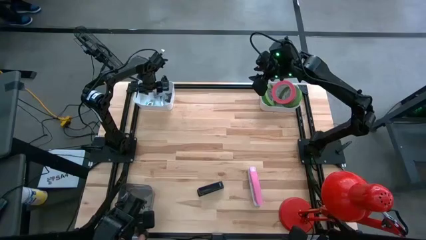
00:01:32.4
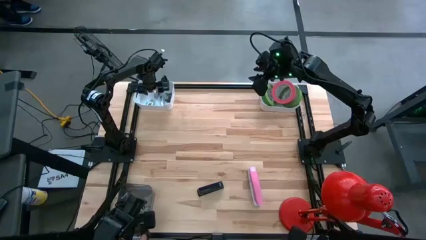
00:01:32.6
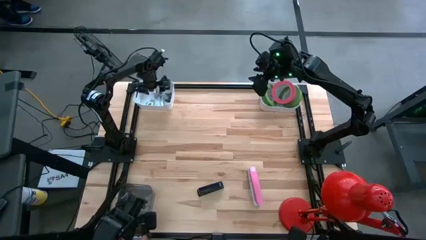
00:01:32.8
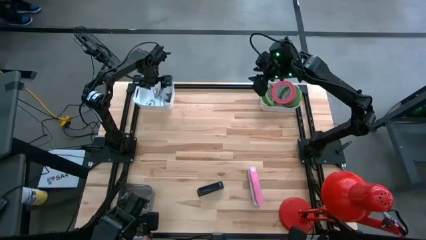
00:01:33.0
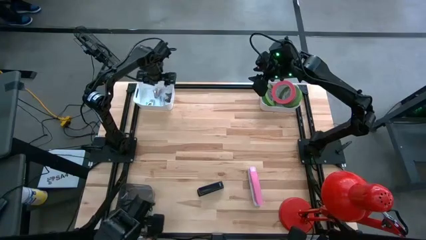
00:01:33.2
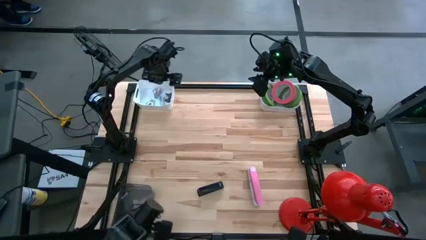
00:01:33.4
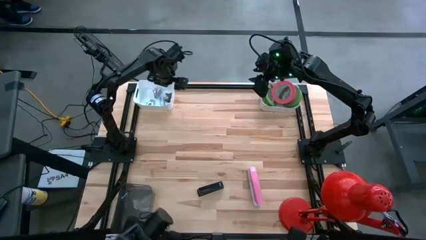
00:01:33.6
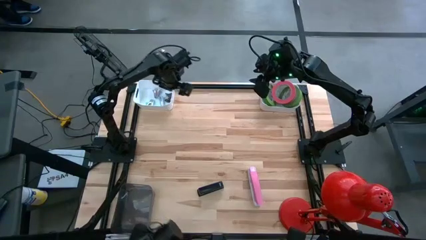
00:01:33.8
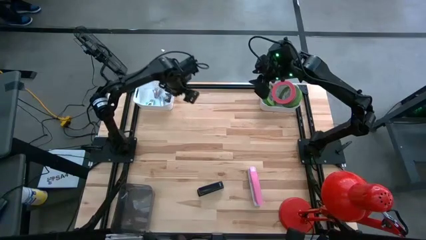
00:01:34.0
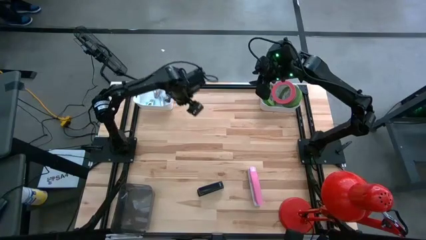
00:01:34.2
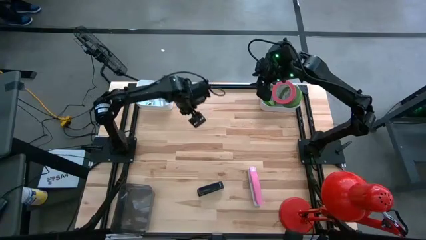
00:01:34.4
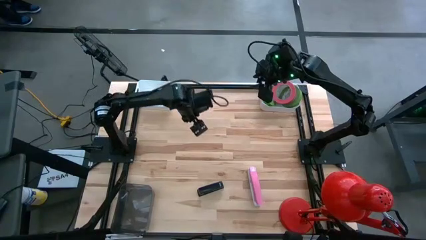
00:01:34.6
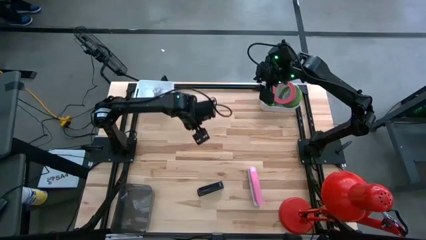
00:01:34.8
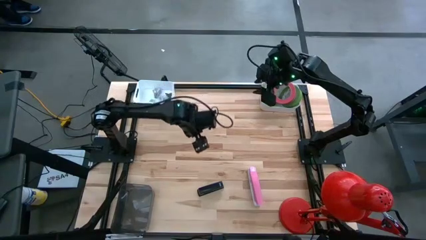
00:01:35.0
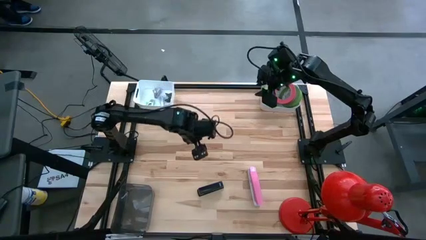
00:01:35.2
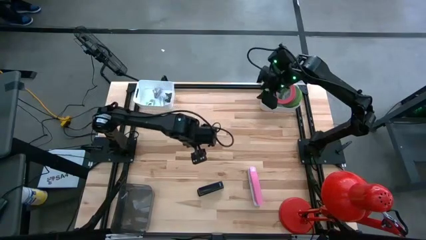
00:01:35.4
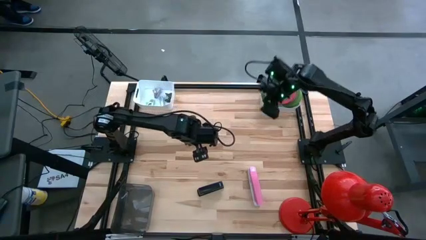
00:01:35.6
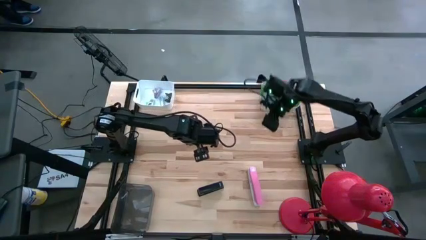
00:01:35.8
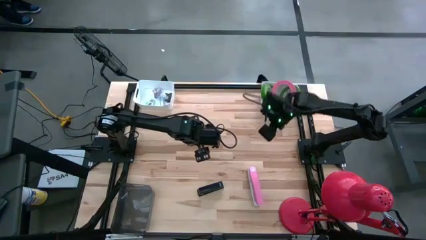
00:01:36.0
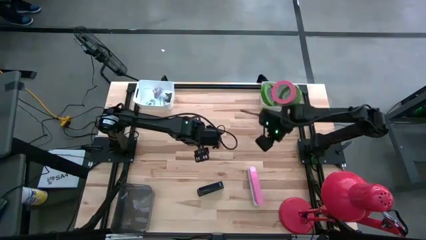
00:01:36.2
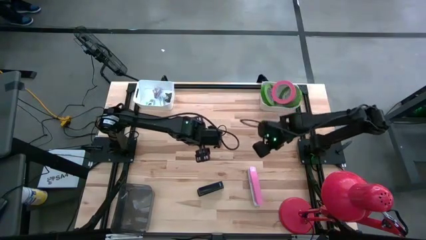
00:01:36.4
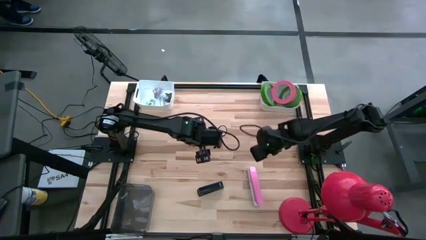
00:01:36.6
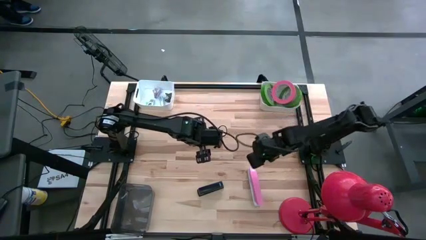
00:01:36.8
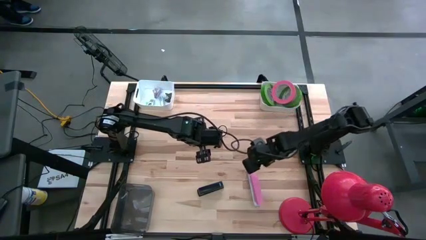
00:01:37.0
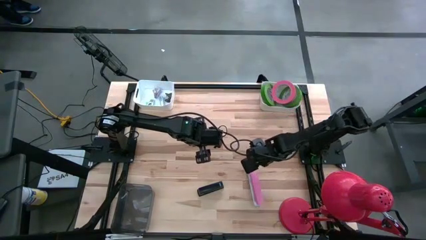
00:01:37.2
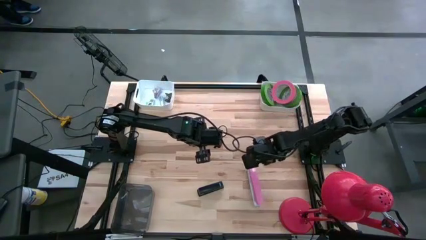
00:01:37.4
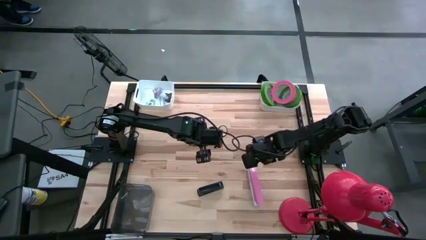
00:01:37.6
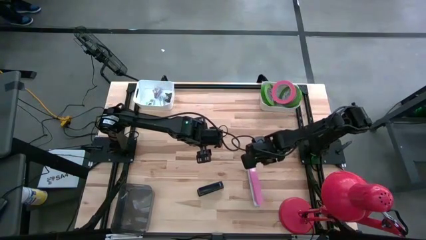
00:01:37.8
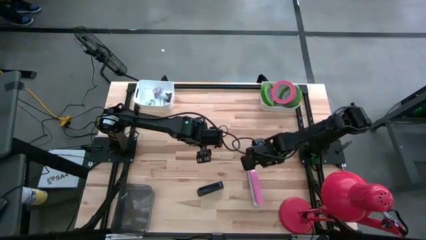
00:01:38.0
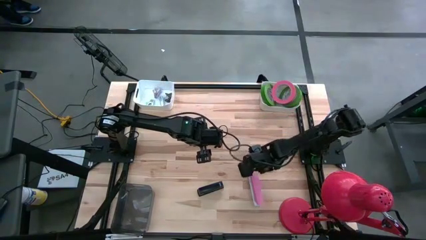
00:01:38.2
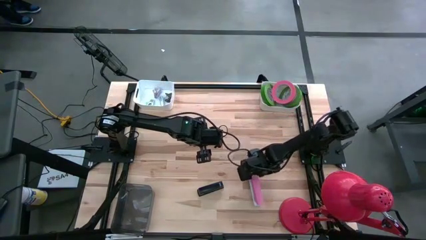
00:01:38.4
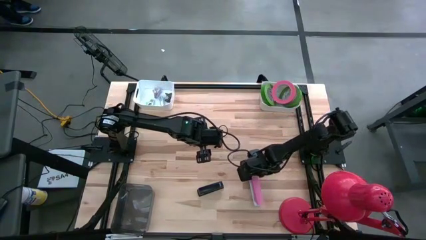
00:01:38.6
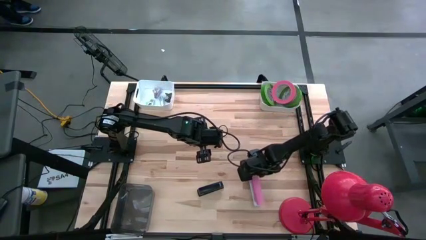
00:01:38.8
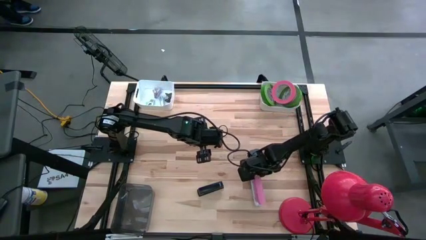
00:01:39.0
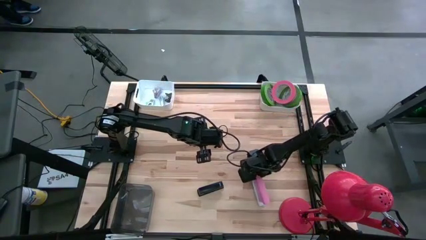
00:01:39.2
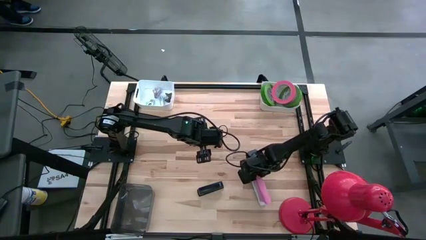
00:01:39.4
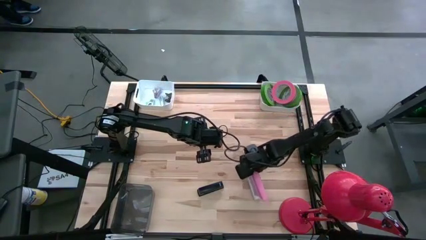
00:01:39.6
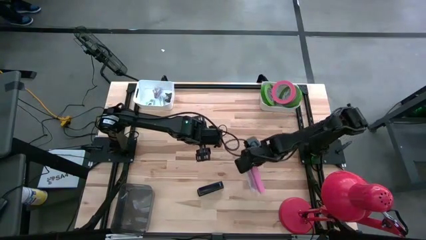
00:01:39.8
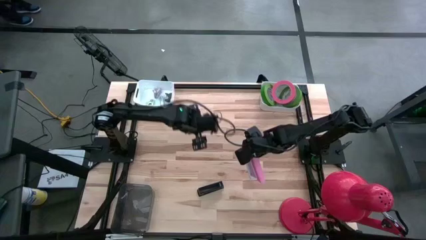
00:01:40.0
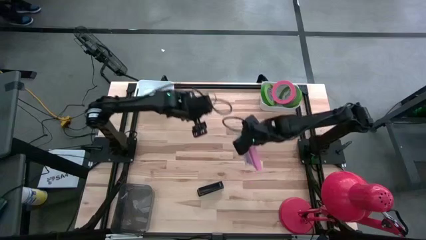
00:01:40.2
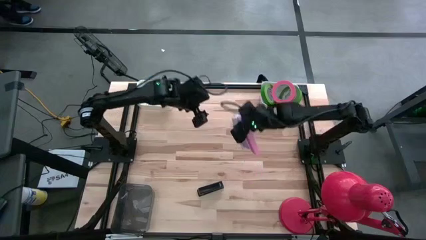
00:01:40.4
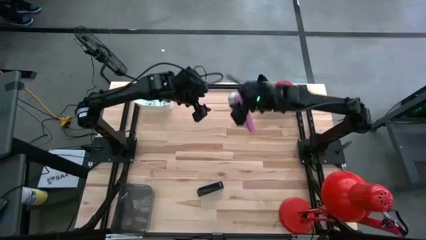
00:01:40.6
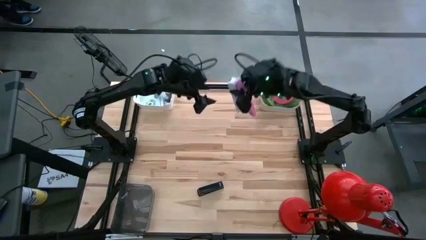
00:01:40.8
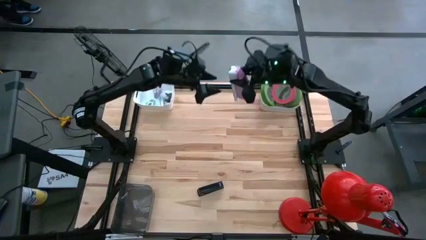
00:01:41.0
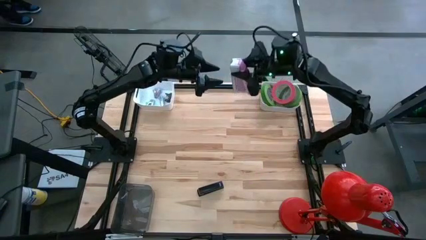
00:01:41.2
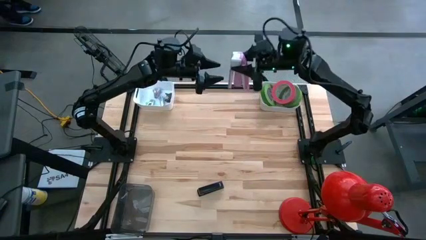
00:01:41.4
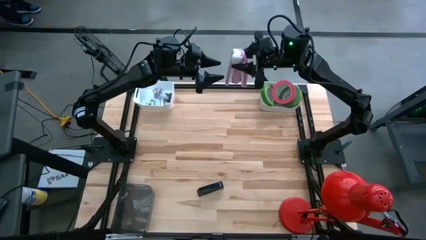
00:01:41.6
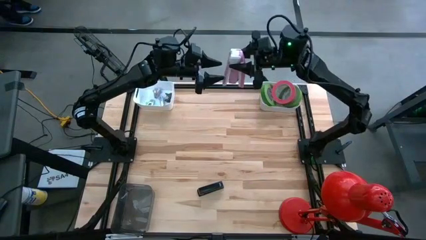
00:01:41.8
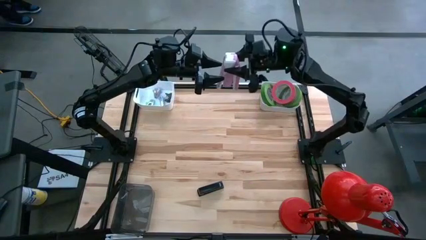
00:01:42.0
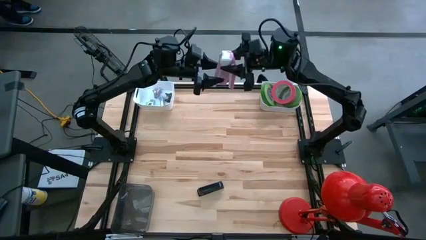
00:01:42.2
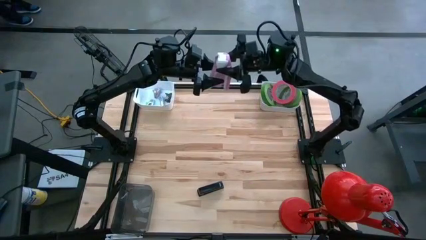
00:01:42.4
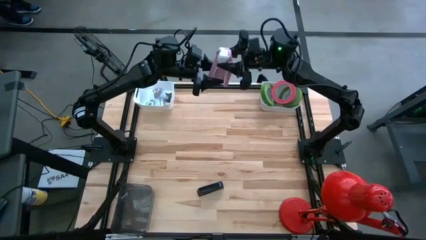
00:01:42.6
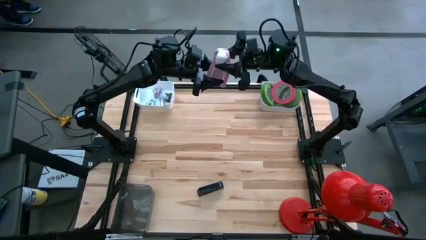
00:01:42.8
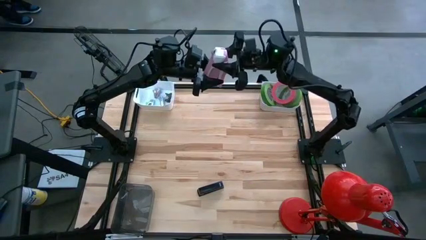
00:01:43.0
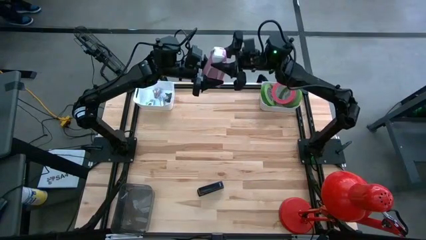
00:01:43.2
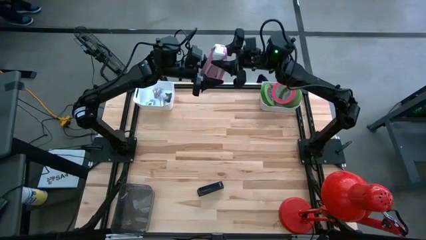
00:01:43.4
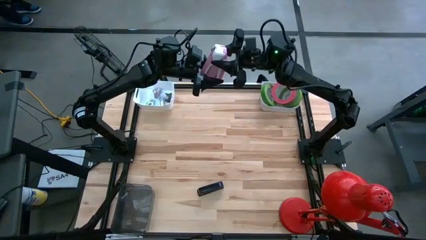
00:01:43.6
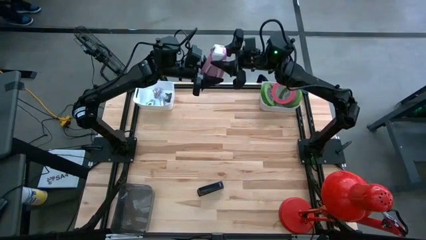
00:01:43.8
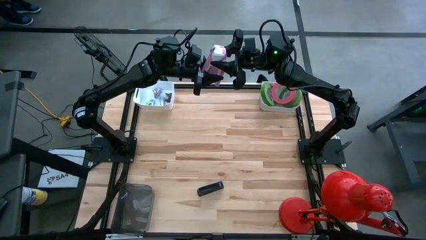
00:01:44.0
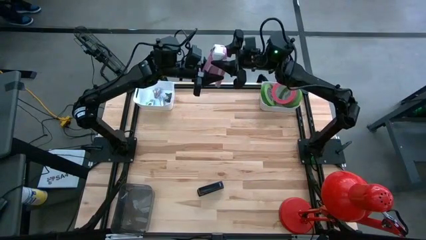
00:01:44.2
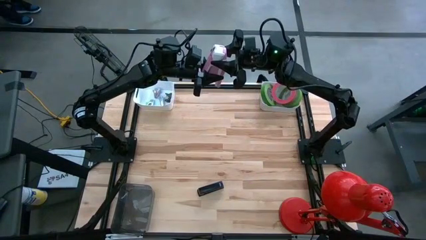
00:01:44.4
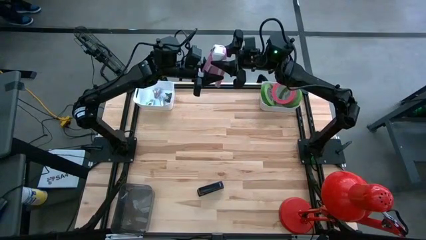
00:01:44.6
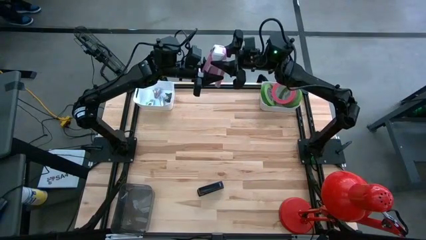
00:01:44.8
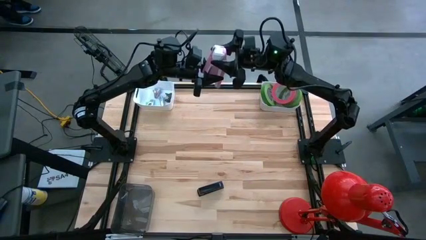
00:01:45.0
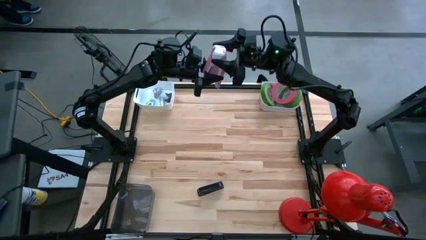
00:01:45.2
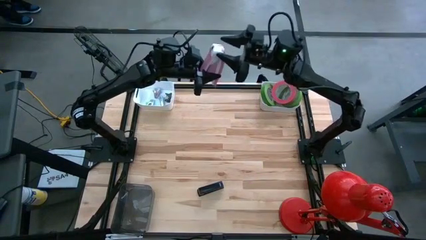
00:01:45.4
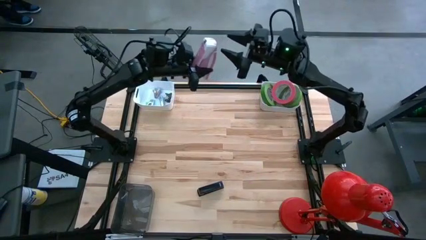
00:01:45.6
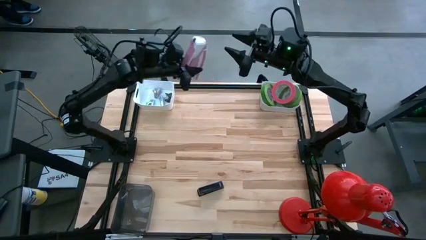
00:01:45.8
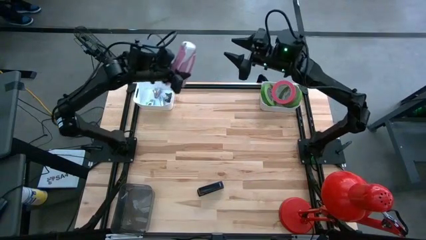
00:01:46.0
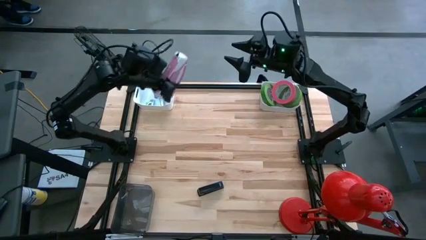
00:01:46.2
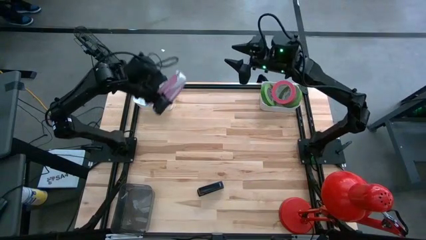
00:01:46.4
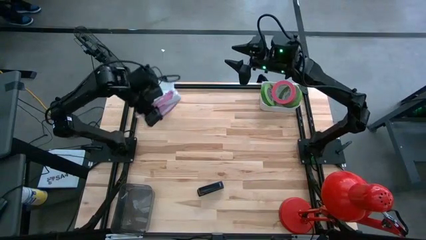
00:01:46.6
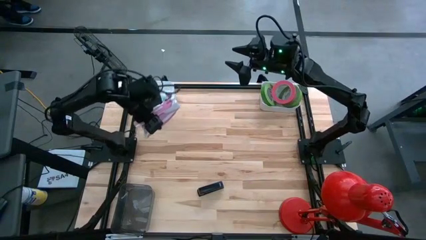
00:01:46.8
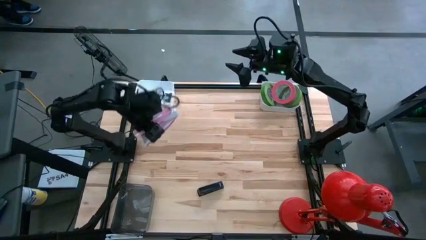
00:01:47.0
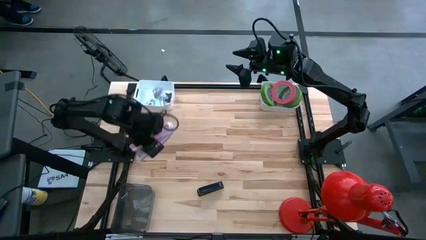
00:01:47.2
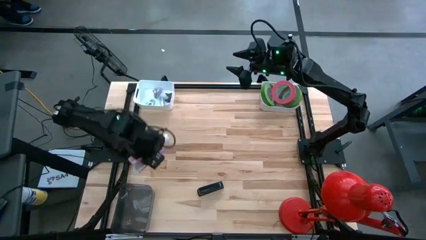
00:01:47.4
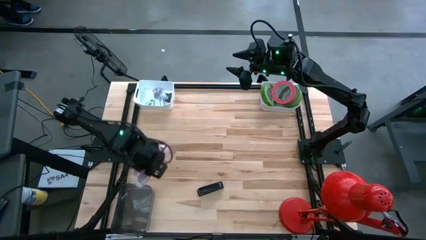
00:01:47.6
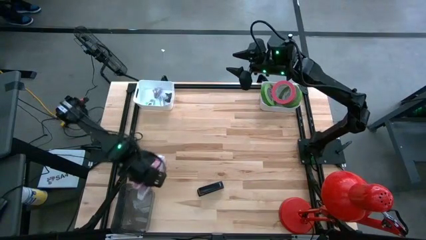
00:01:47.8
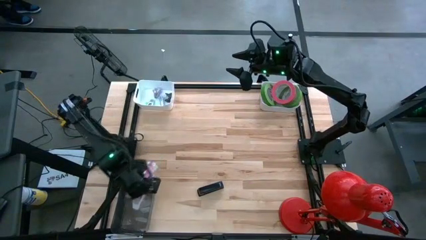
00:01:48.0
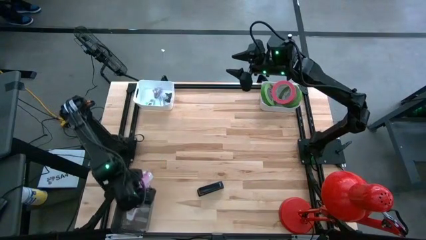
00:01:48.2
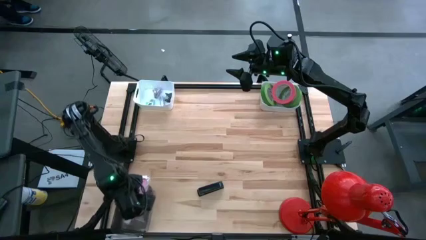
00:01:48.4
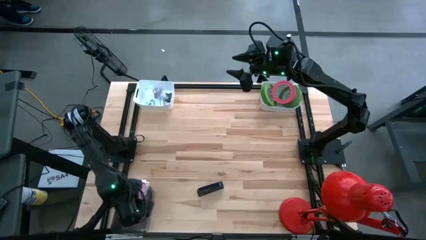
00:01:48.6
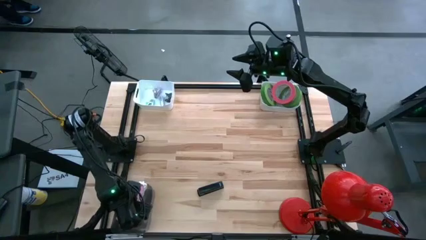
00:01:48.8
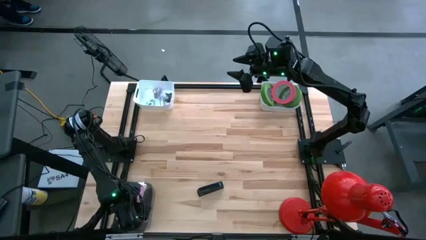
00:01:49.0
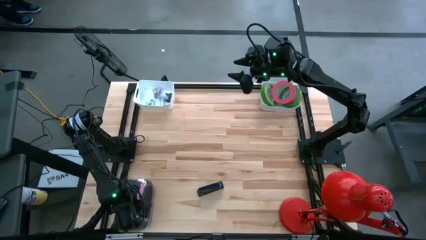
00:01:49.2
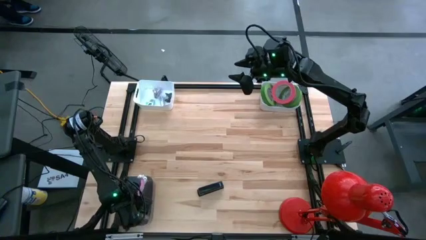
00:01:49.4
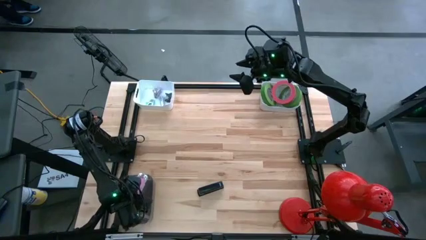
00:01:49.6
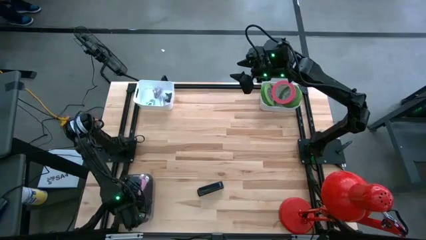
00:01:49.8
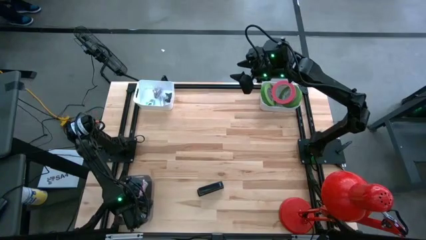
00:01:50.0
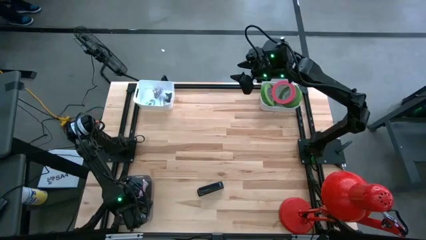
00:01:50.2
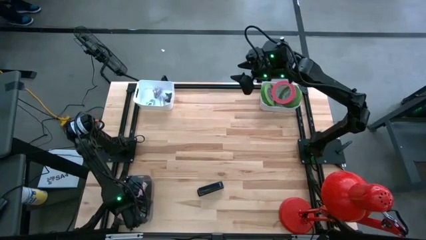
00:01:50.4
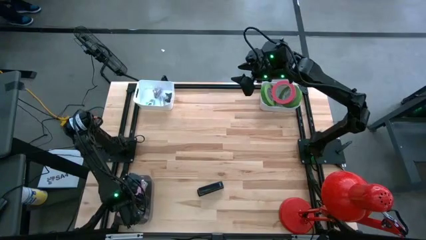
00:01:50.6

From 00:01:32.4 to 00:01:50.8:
Task: Pick and place Stapler, Stapler remover, tape
Put the pink stapler into the black bin
